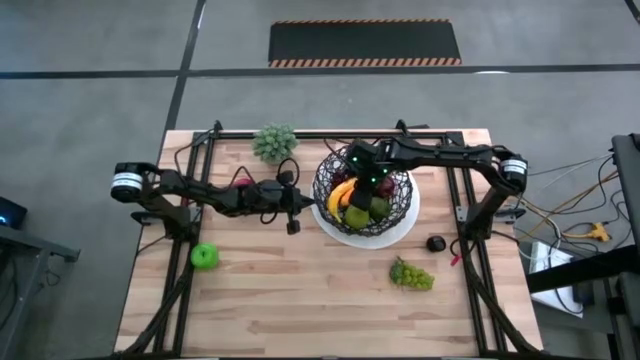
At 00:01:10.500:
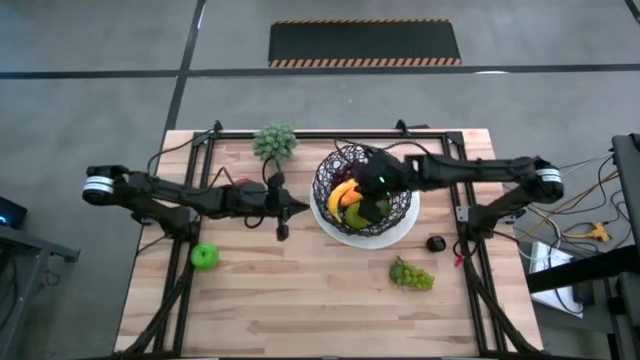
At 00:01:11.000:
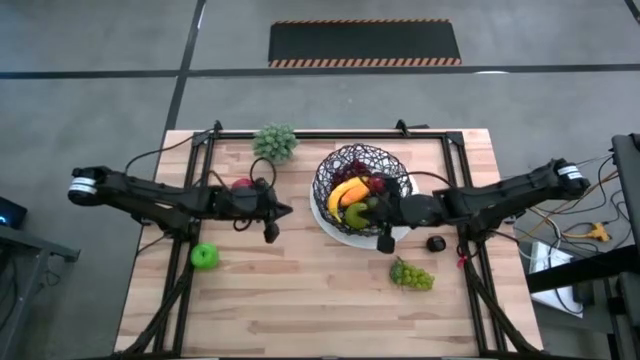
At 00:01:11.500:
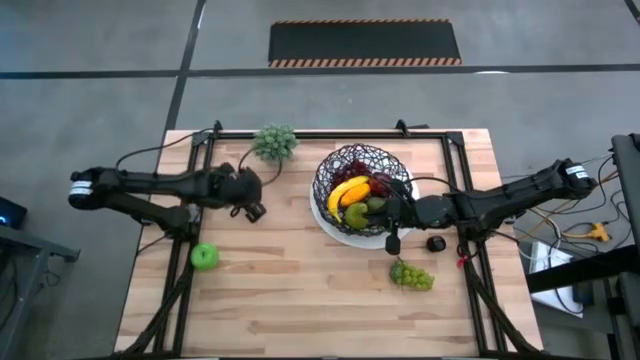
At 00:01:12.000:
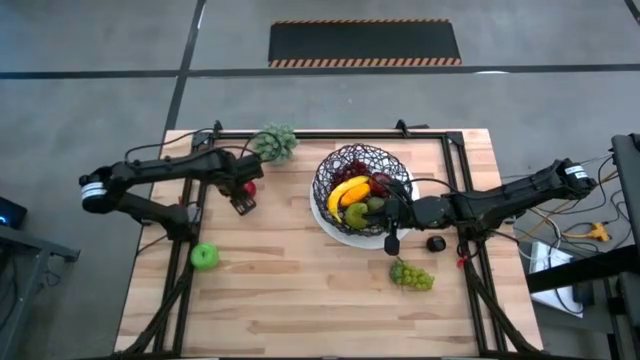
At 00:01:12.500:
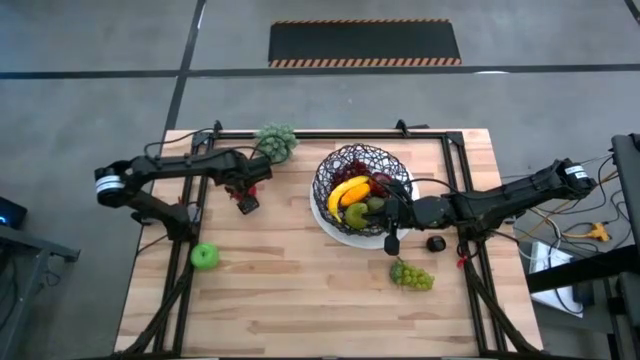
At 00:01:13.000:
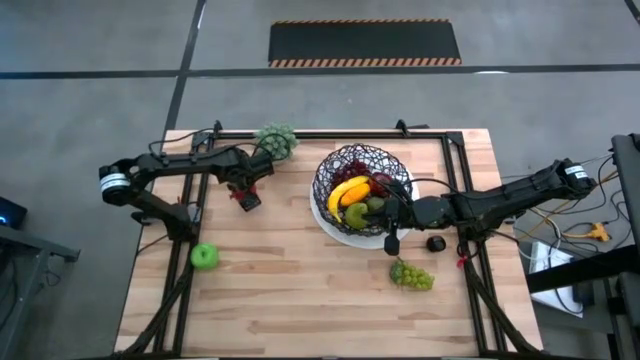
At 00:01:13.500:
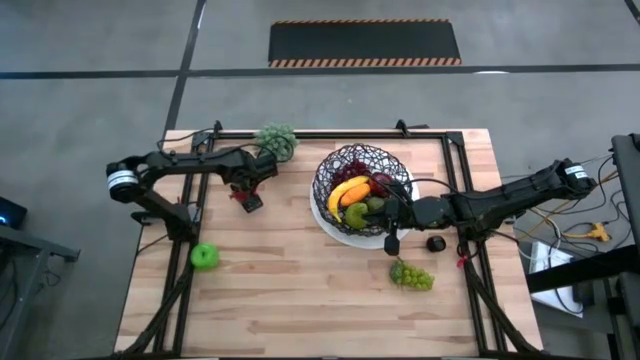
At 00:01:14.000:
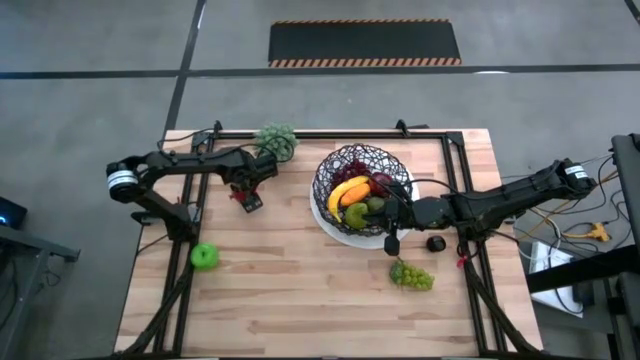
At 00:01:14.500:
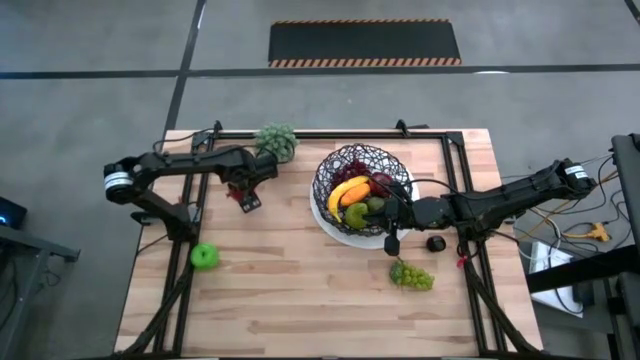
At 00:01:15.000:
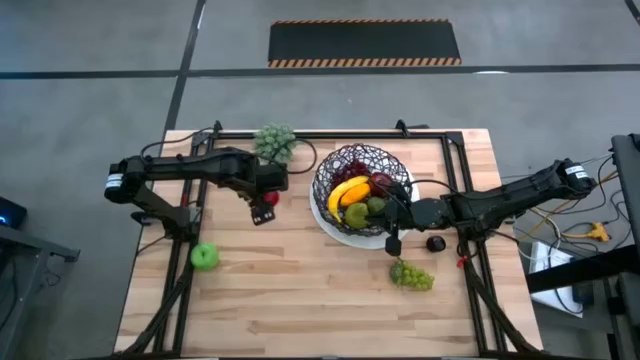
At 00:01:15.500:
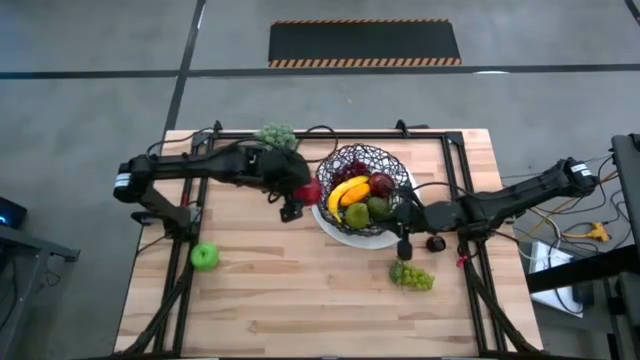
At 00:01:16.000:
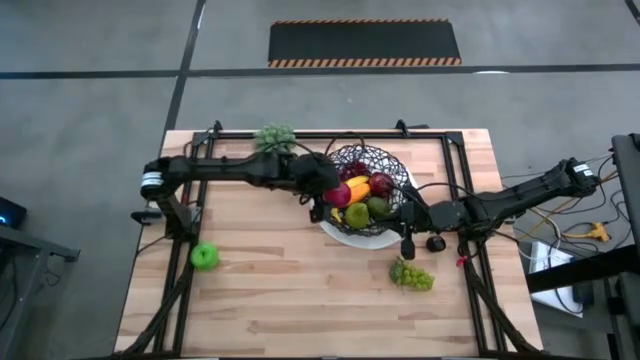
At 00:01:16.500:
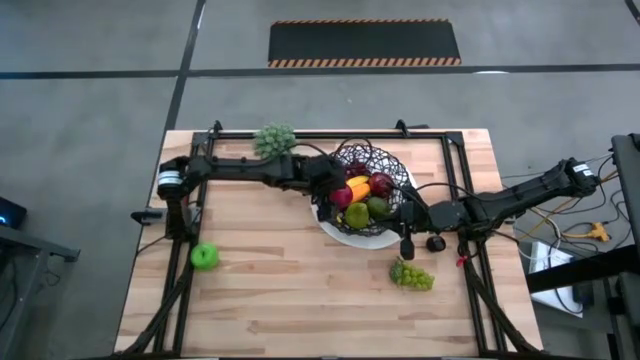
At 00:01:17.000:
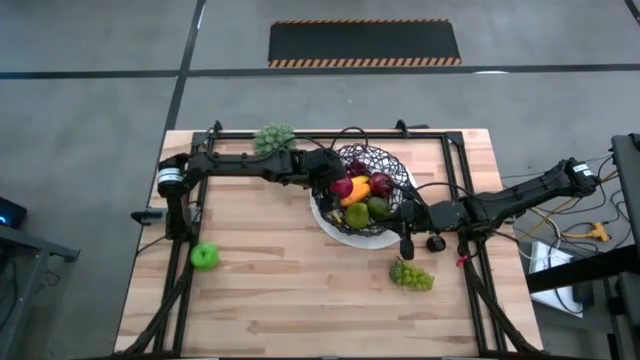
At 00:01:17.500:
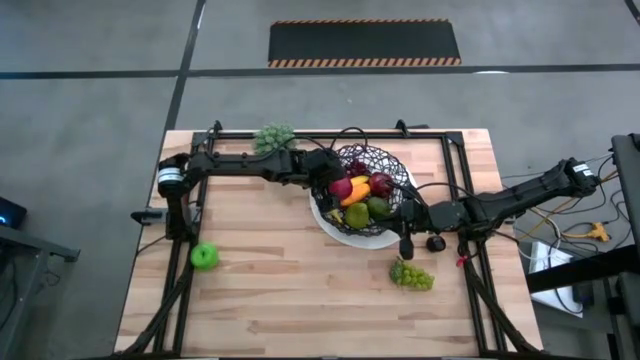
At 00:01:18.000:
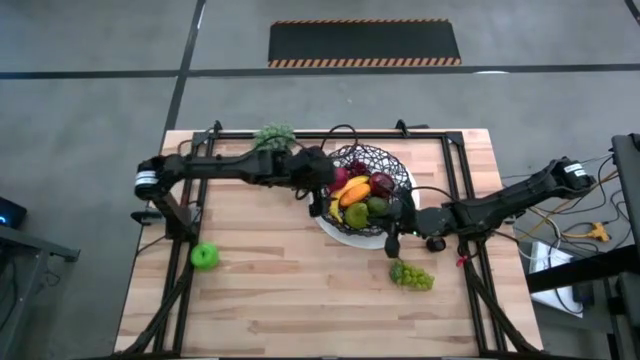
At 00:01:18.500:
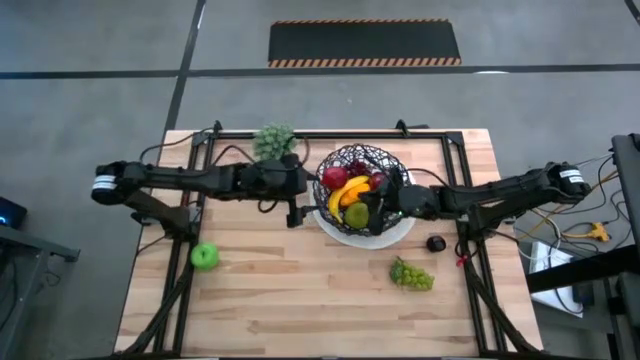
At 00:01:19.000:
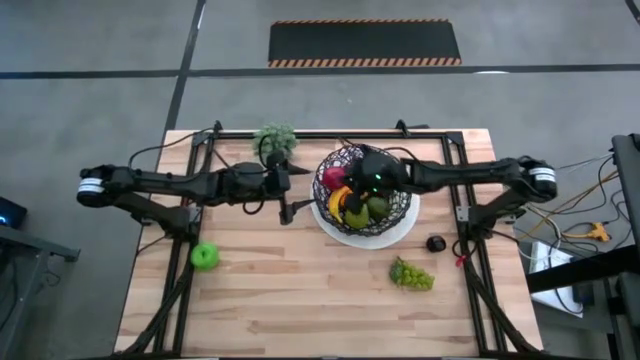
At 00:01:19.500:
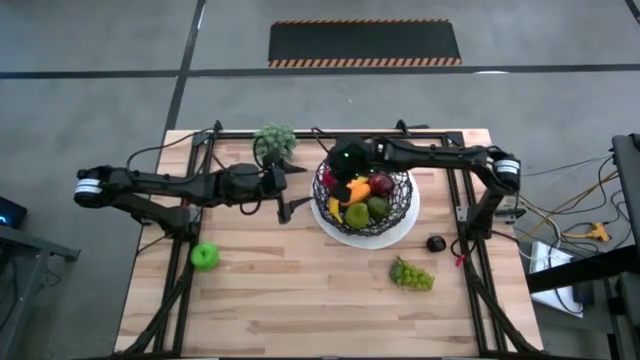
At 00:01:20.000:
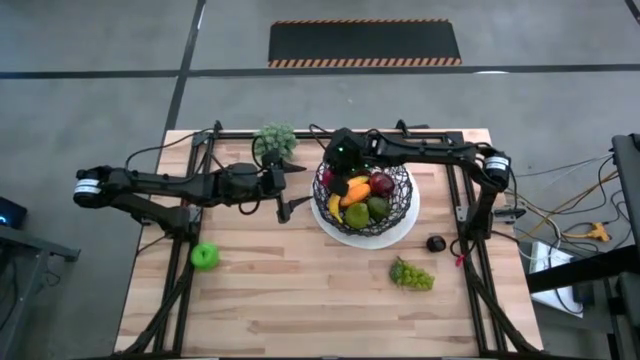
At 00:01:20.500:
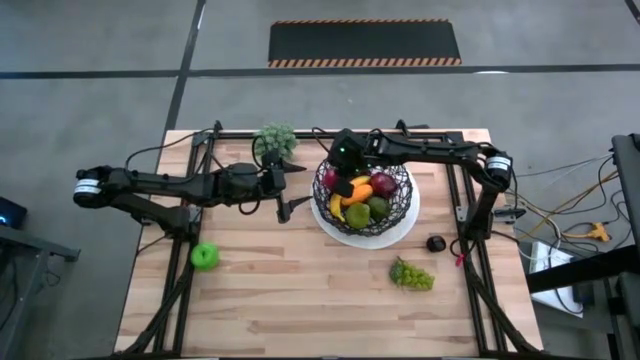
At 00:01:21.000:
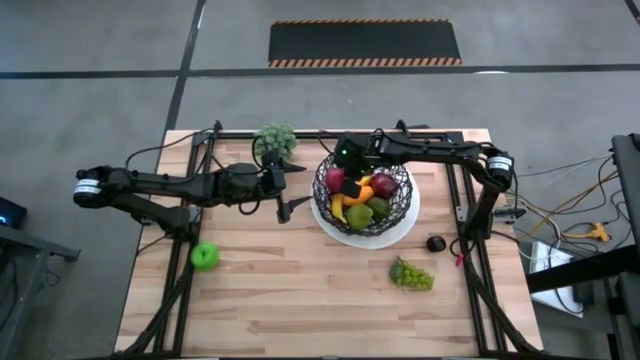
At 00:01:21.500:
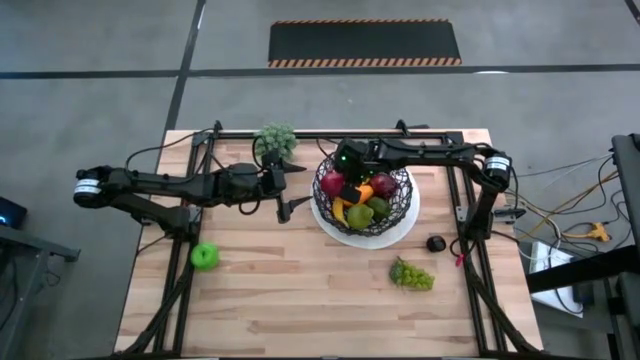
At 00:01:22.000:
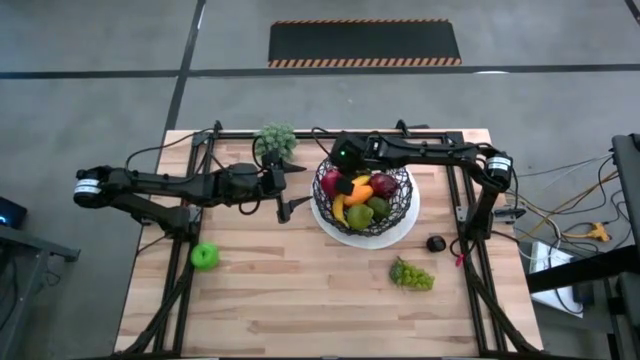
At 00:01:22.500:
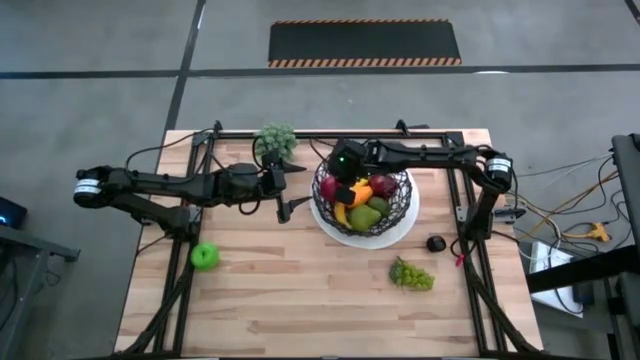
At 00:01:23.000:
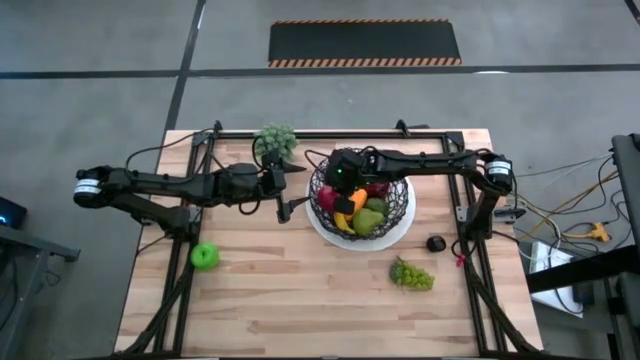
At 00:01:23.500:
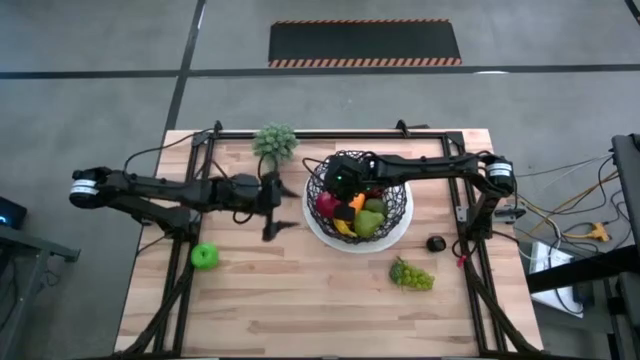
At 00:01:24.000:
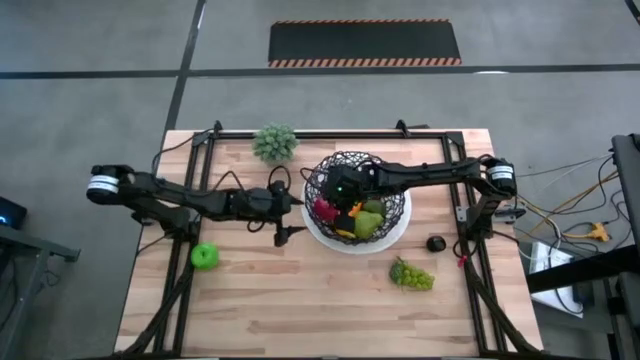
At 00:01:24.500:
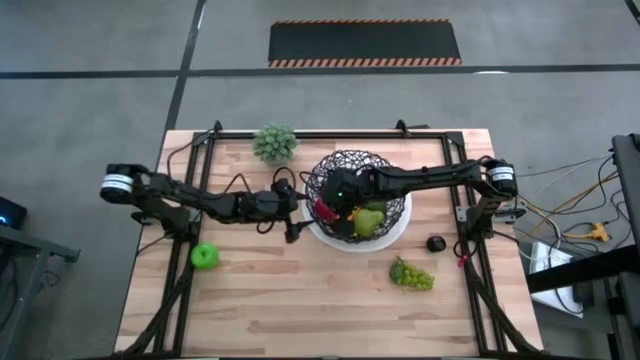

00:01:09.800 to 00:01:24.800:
Task: Build produce basket
Put the red pomegranate into the black wire basket

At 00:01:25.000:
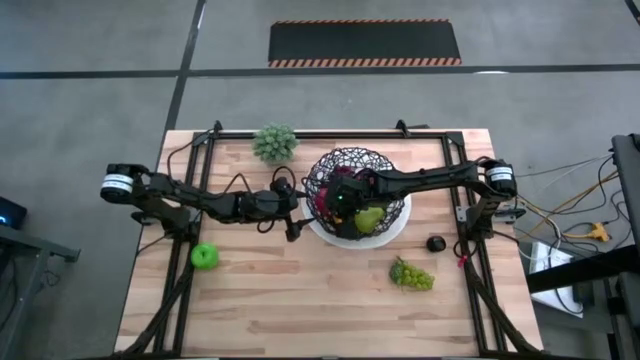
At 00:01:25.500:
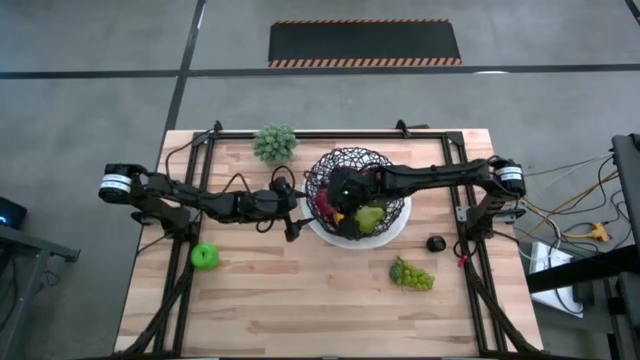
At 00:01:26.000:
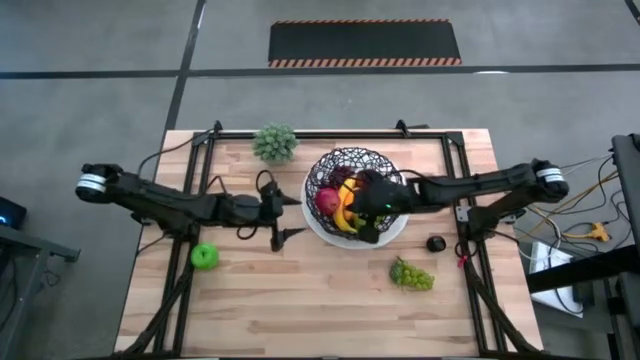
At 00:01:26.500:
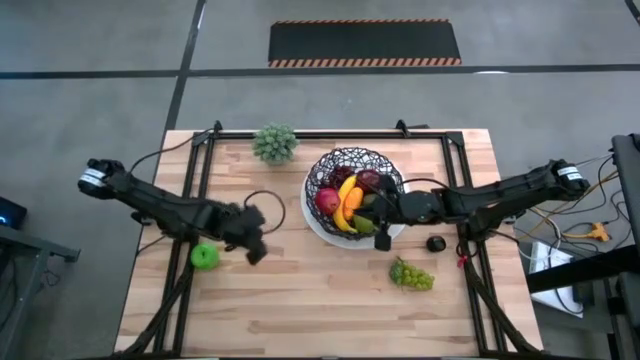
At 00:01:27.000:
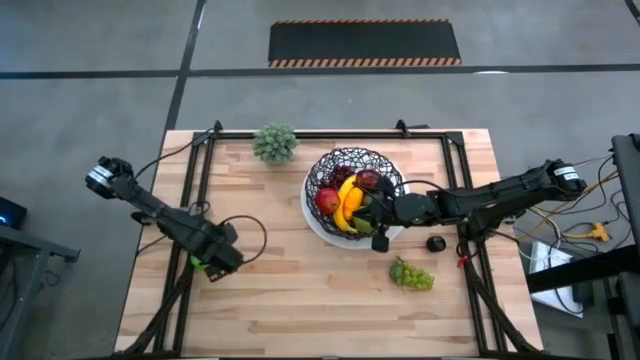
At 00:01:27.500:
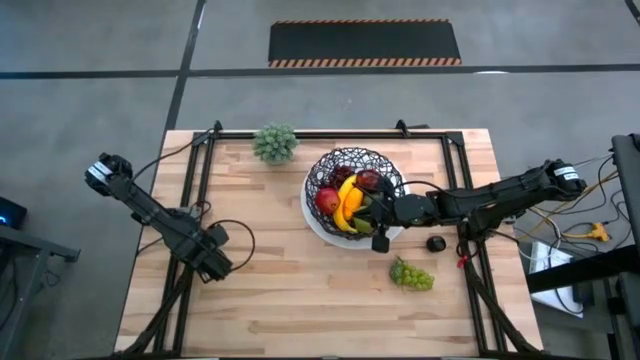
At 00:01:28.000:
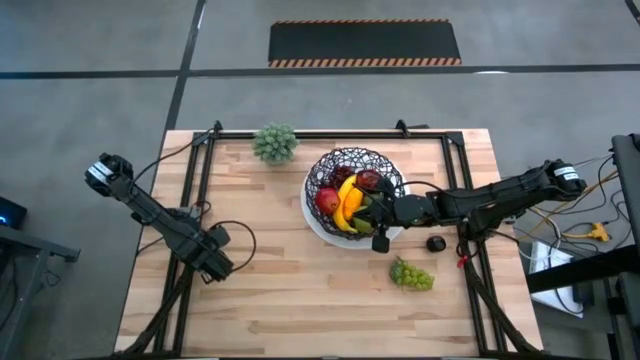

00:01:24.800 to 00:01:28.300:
Put the green apple into the black wire basket

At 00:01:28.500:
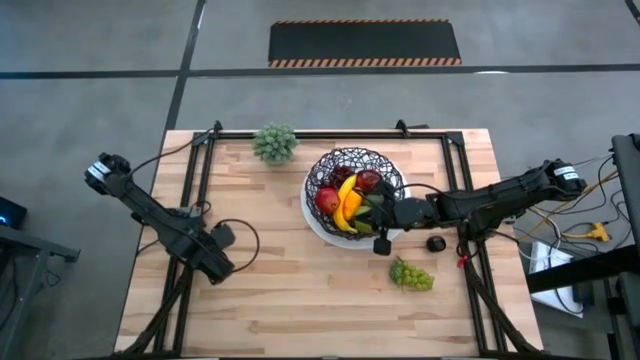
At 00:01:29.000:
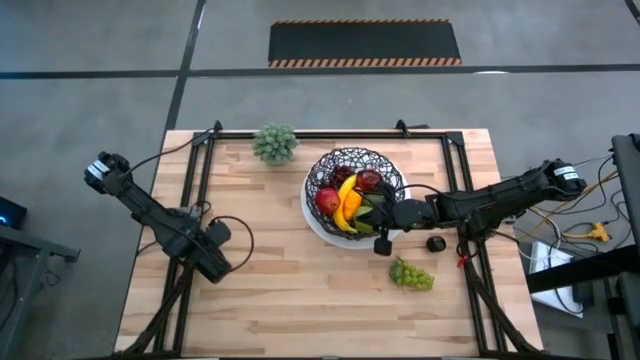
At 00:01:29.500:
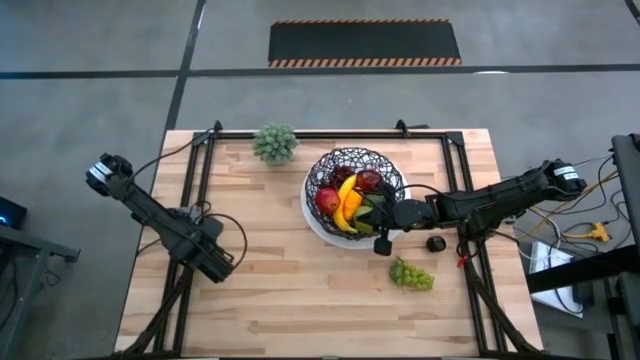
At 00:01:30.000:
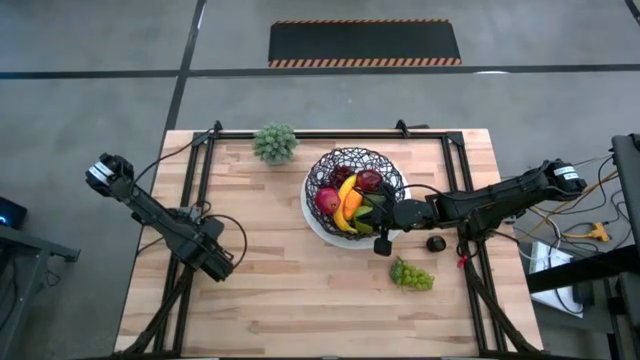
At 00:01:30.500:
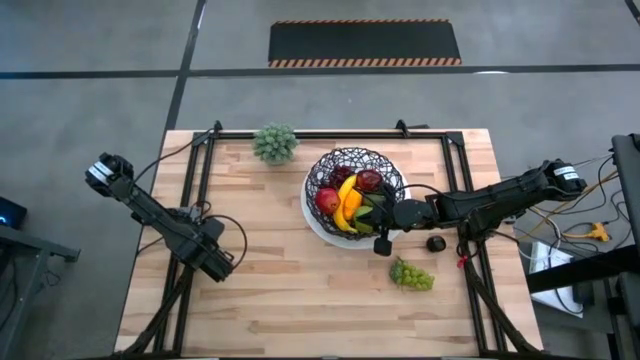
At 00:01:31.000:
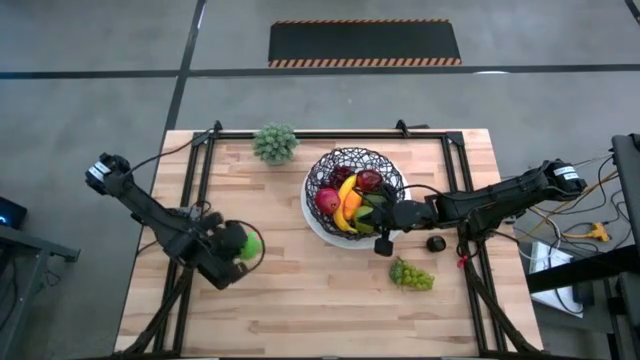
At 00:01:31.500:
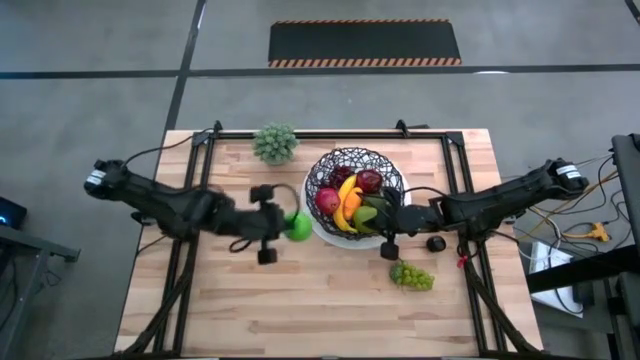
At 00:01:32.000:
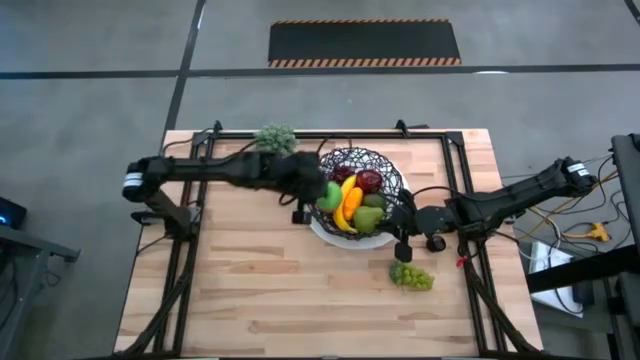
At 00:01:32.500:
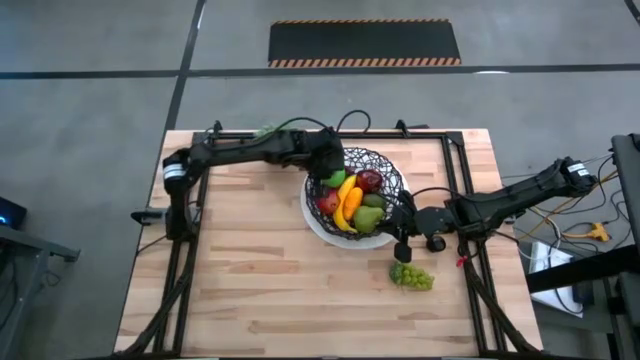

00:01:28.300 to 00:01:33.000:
Put the green apple into the black wire basket
